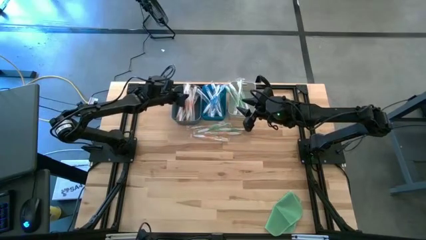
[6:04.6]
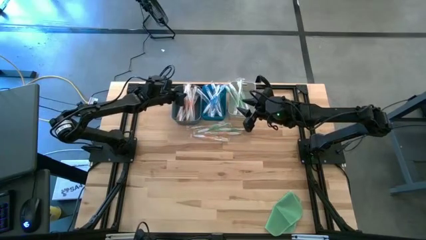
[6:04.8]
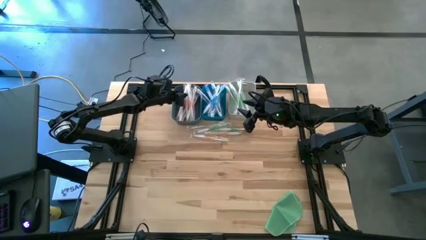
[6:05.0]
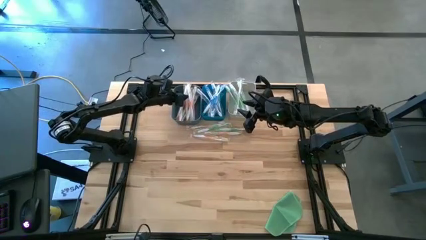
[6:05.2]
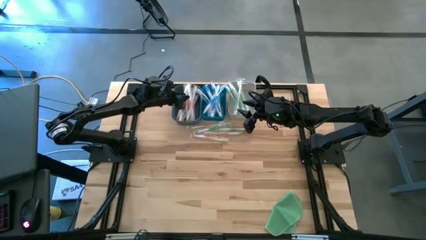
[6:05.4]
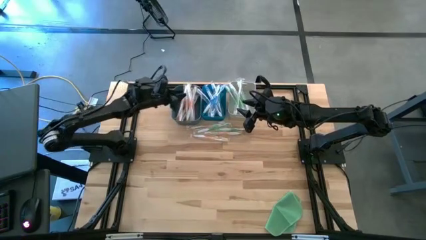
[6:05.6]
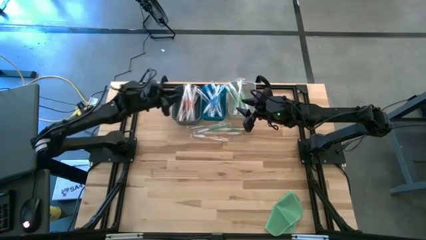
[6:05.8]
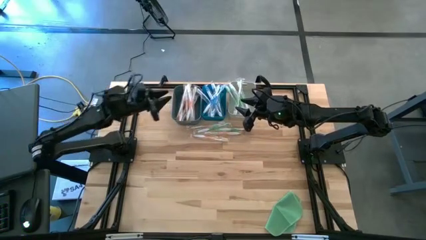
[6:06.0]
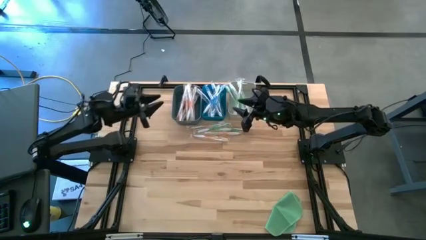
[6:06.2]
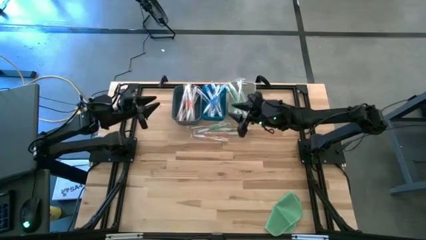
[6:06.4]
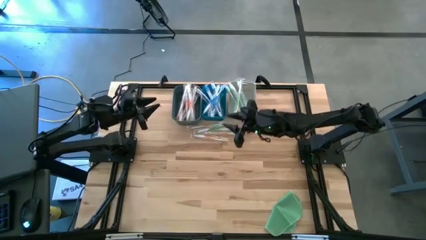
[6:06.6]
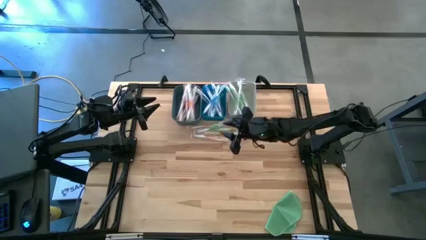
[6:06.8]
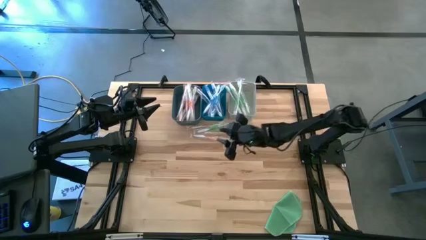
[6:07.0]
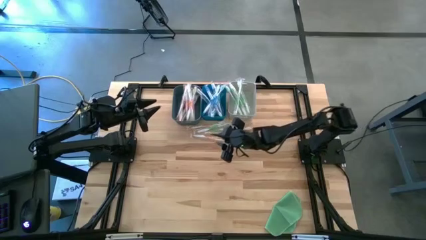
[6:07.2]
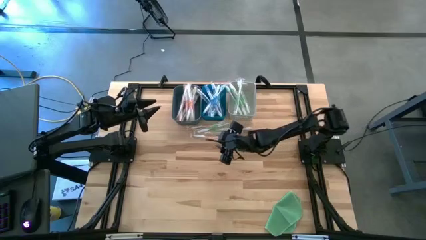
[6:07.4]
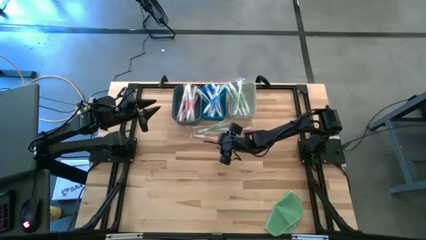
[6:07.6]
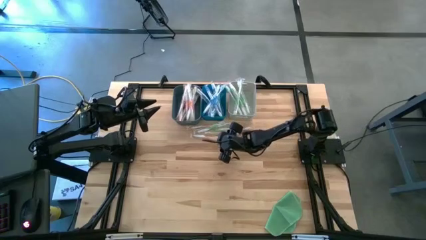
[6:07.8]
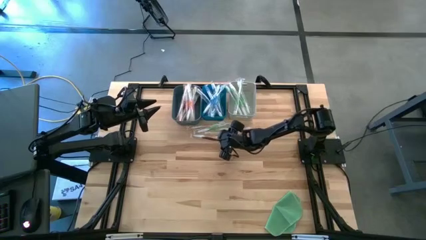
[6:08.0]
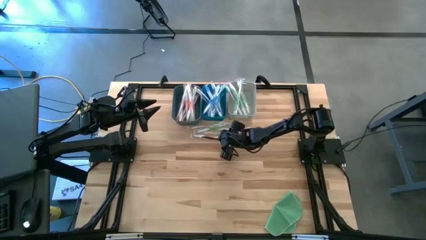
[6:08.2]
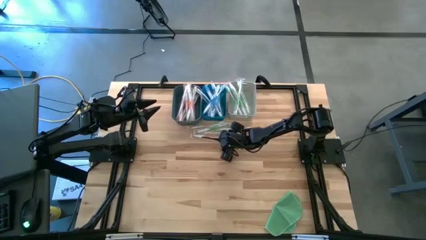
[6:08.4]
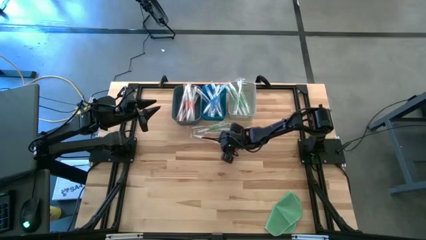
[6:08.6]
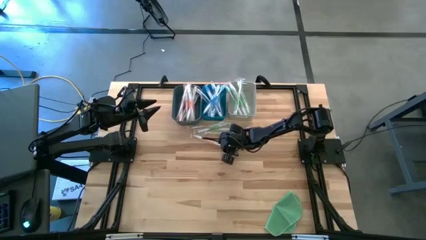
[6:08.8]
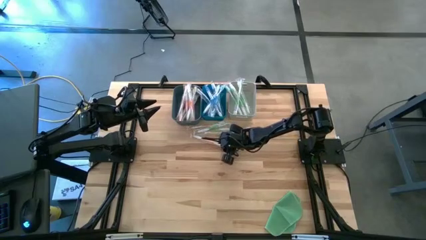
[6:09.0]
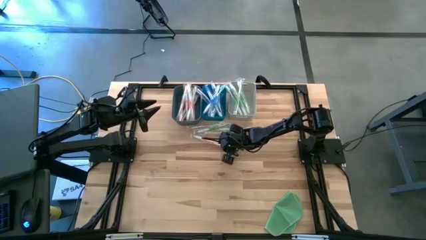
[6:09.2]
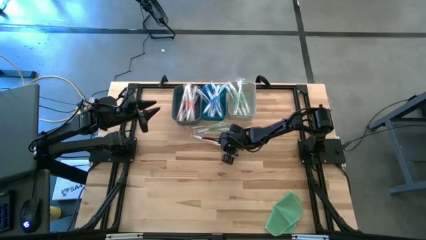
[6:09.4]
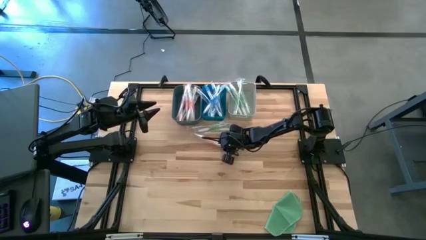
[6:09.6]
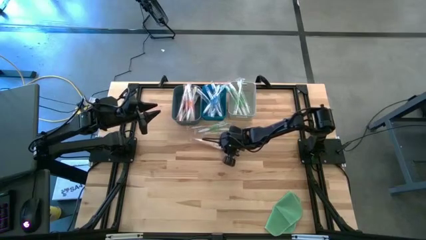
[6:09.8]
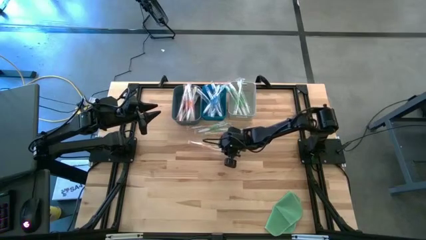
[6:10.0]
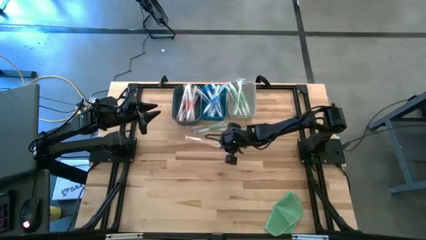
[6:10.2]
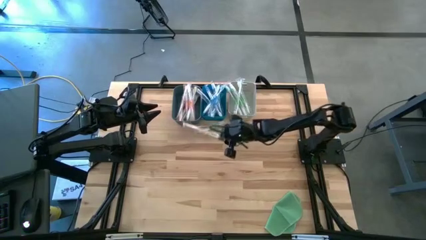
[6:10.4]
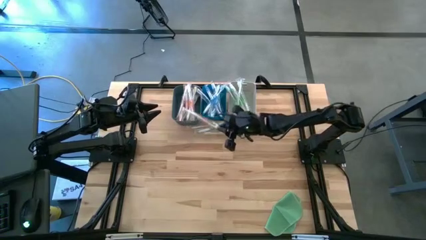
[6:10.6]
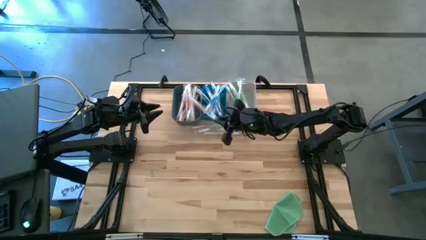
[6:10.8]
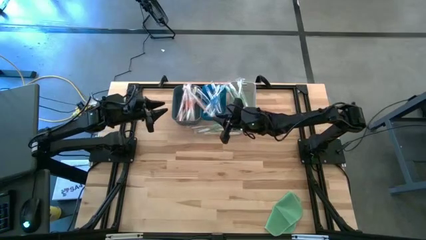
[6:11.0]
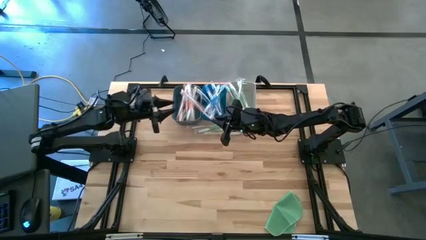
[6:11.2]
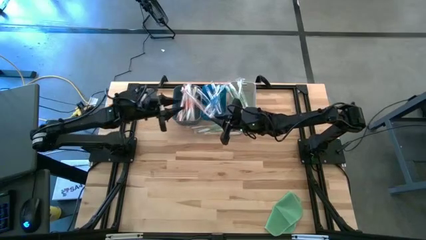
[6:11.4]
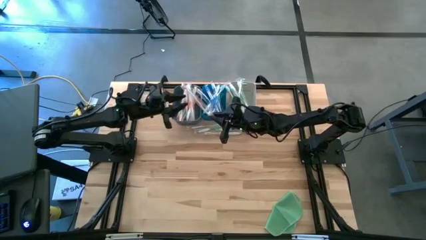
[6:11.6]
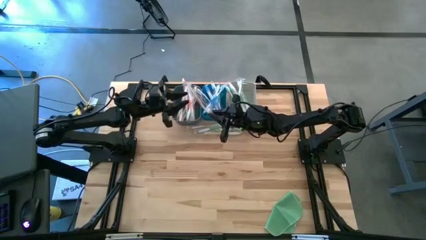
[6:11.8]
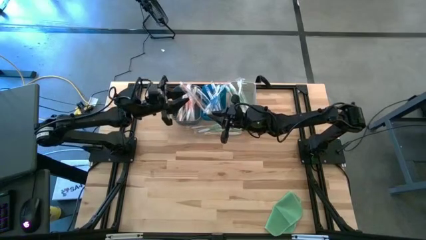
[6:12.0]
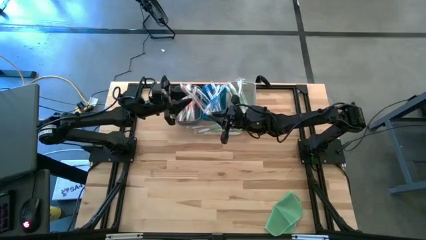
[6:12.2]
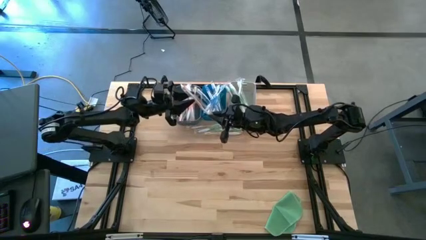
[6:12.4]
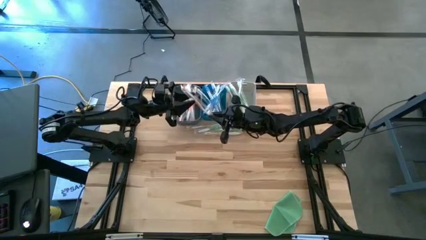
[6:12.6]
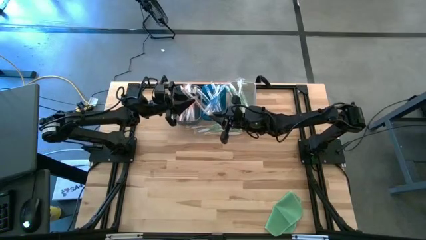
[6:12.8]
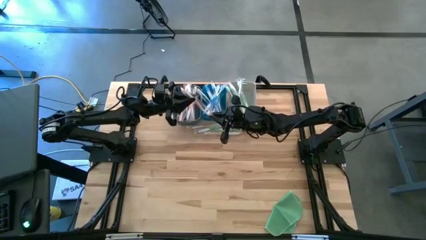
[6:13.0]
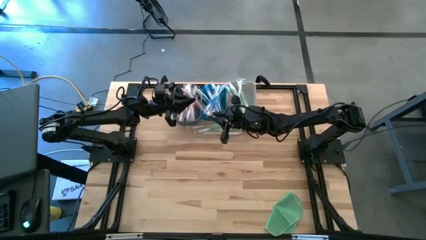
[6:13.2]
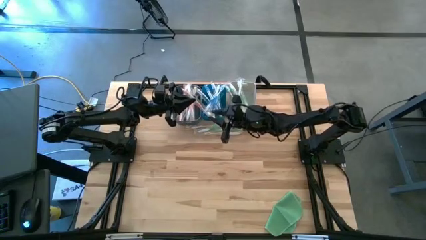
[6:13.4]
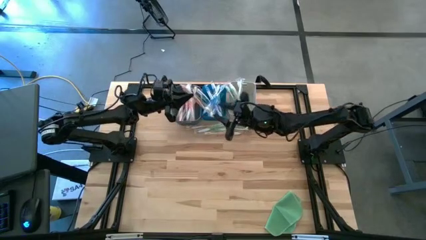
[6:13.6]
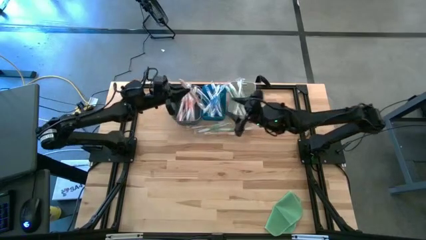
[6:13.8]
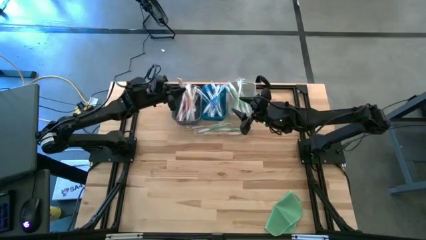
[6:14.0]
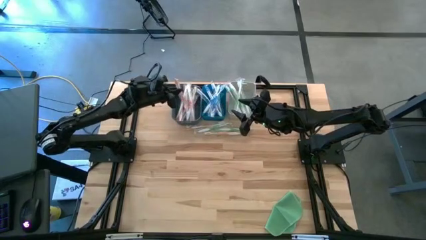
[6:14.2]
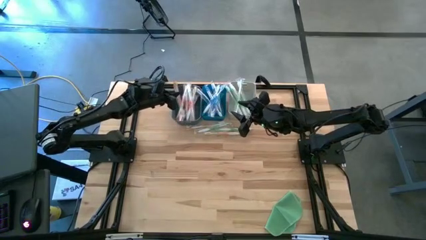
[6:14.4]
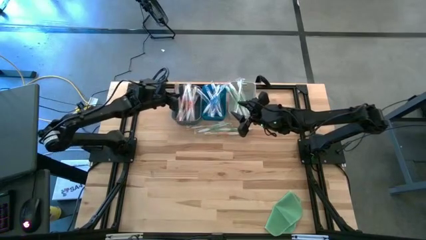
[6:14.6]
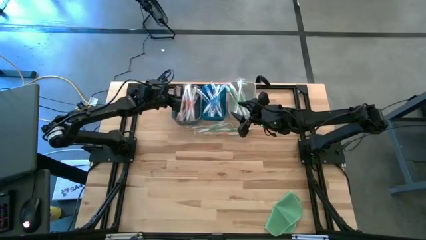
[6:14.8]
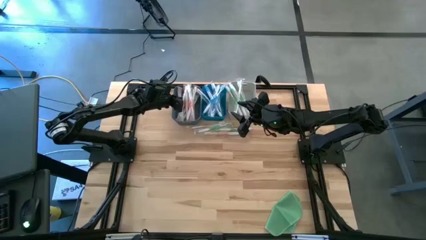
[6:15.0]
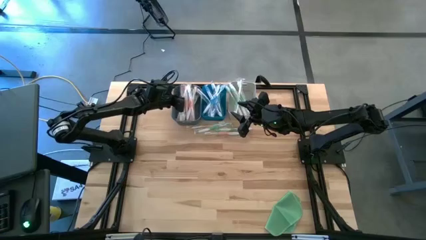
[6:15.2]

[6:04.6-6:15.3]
Task: Pick & Place Toothbrushes
Put the orange toothbrush into the dark blue bin

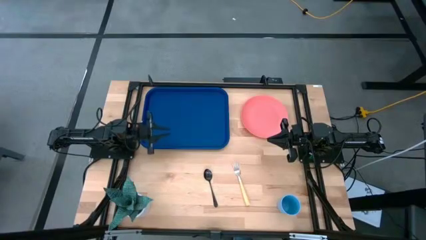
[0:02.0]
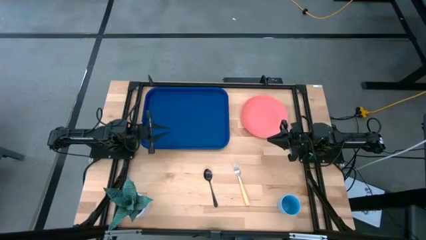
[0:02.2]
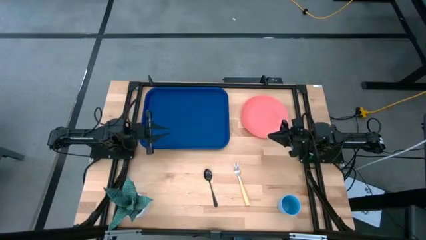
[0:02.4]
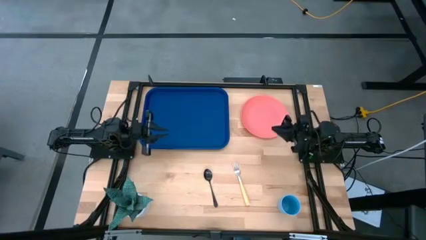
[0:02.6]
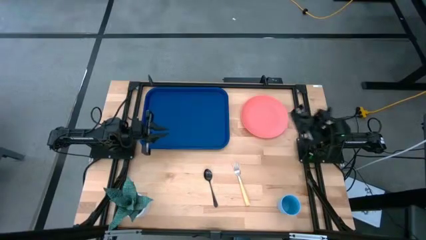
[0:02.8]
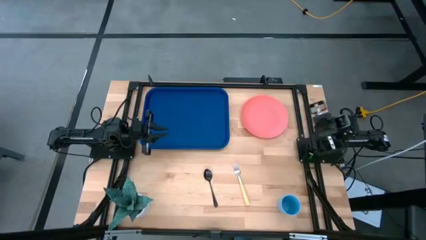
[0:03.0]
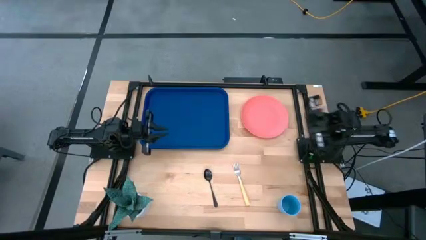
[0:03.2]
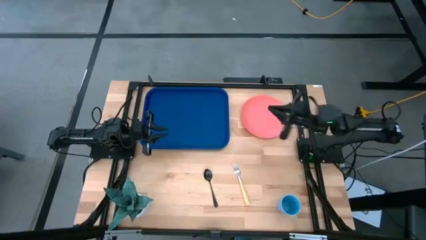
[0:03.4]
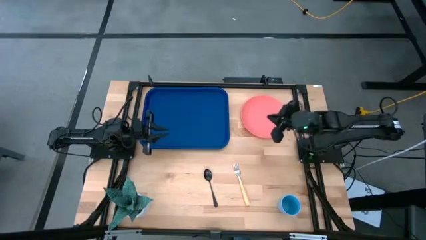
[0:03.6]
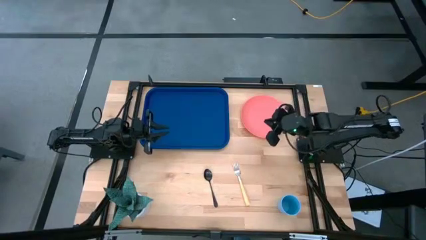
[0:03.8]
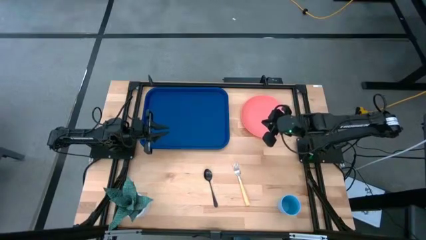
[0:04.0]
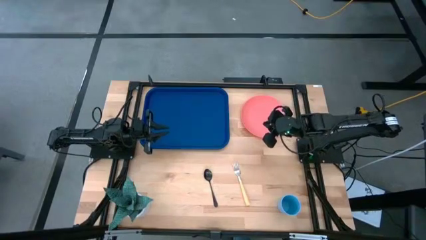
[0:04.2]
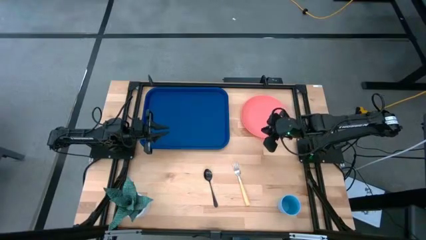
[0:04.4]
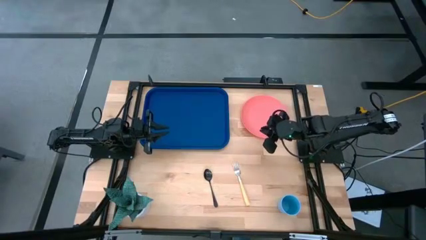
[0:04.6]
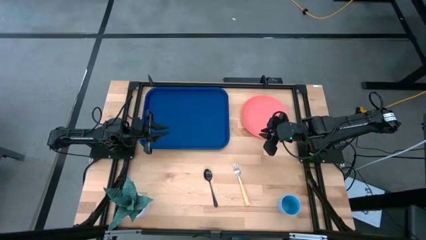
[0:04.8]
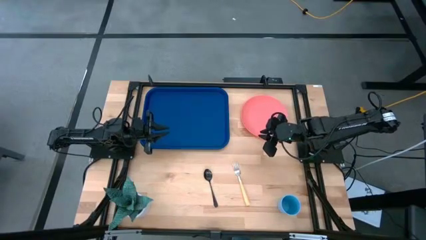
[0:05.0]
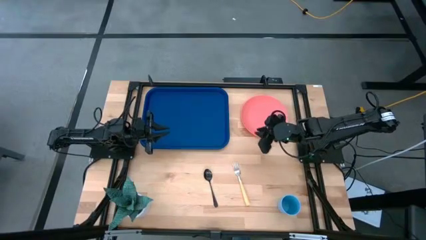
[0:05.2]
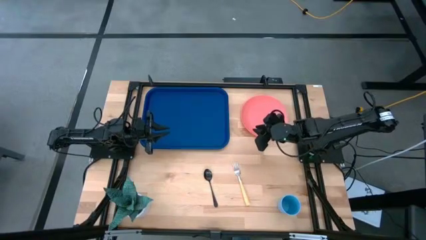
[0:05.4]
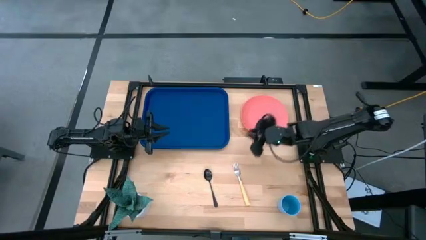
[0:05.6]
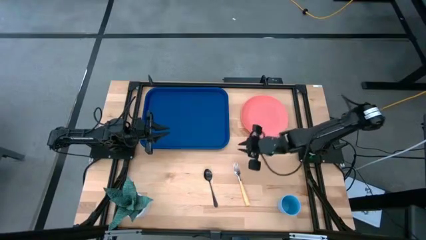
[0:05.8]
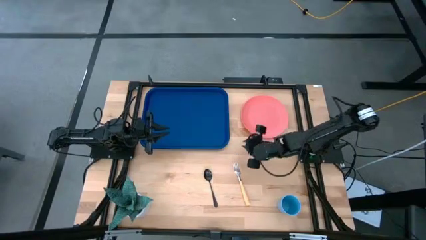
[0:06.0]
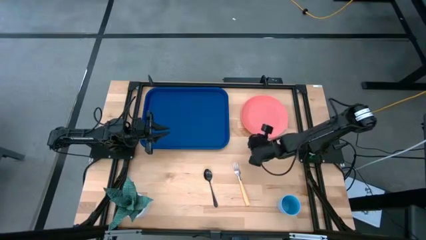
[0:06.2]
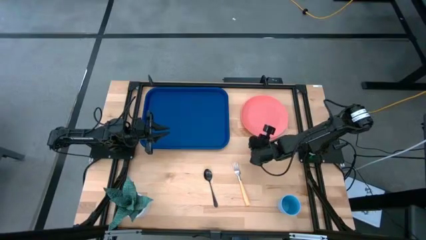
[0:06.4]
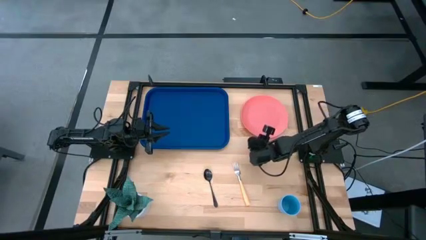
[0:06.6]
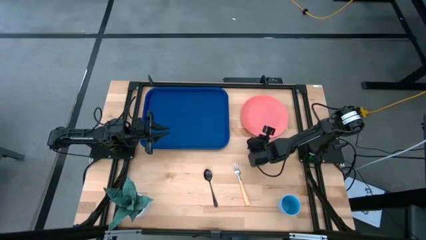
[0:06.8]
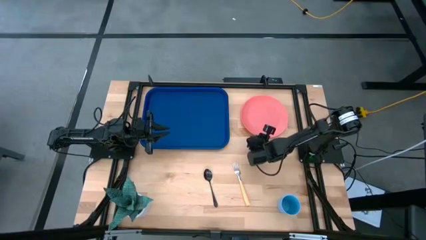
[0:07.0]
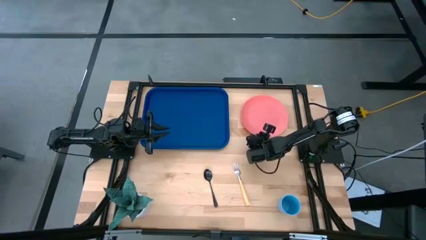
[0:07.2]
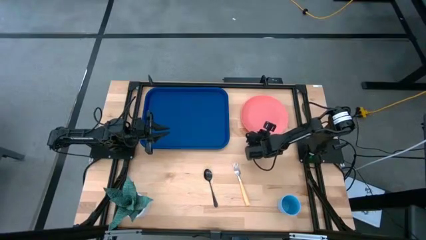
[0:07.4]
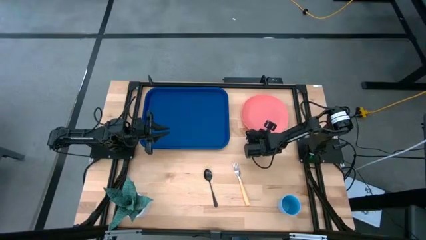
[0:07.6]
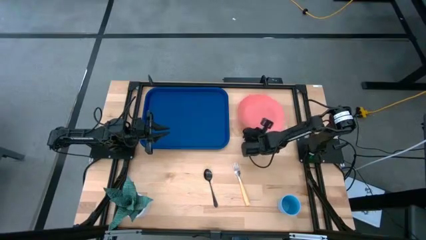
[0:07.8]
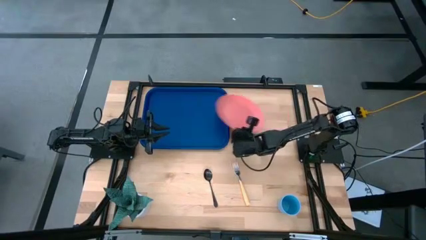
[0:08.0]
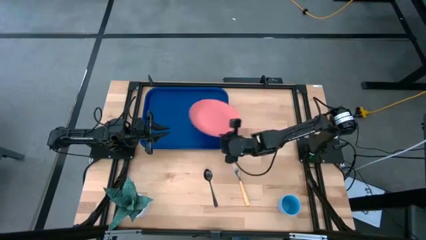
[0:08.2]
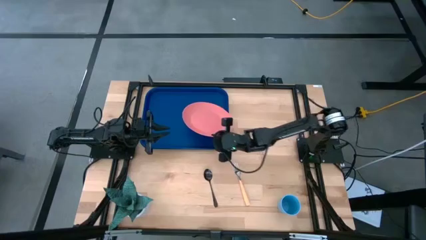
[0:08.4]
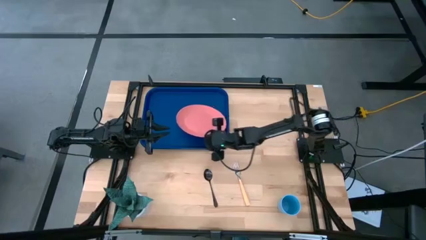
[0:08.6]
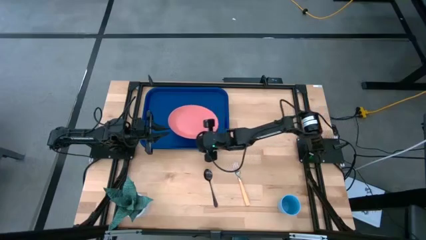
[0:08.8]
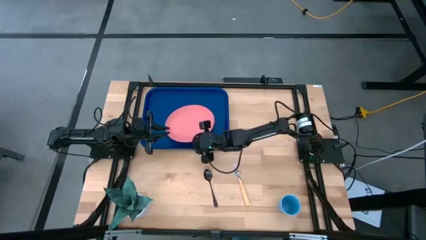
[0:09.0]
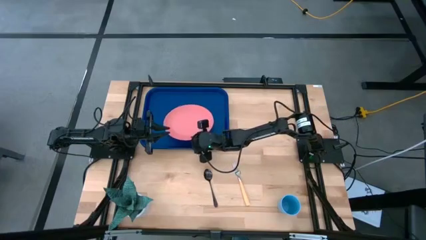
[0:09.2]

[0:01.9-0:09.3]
Task: Pick and place plate/cup/fork/spoon on tray
Put the pink plate on the serving tray
